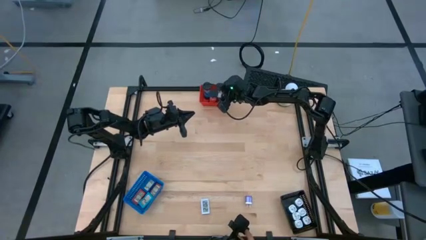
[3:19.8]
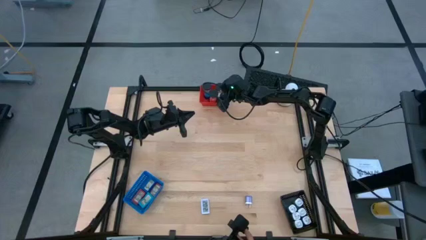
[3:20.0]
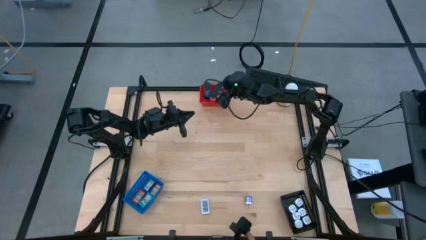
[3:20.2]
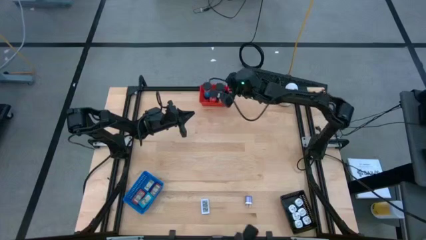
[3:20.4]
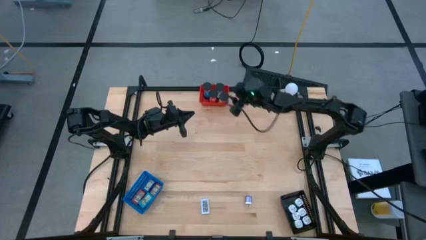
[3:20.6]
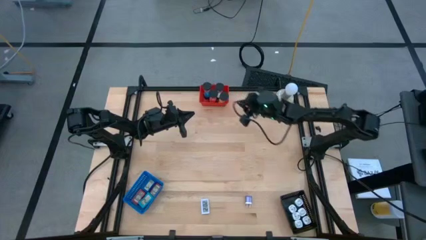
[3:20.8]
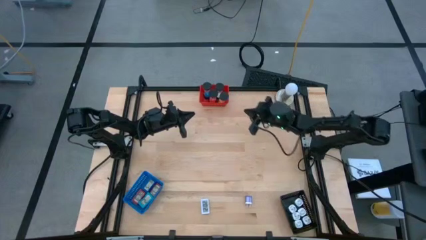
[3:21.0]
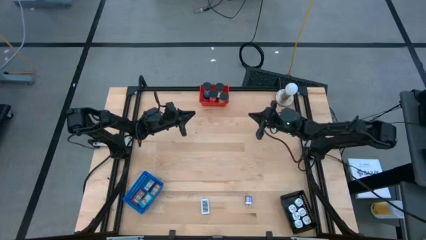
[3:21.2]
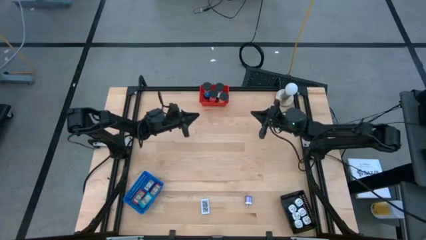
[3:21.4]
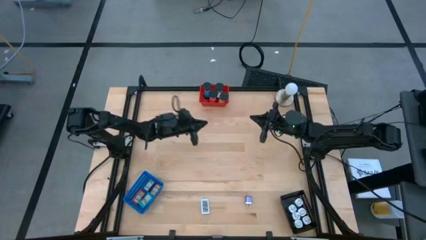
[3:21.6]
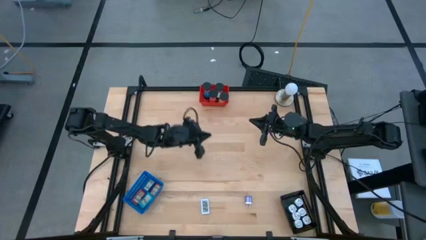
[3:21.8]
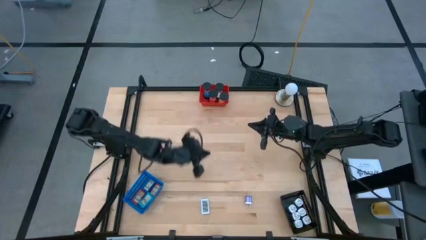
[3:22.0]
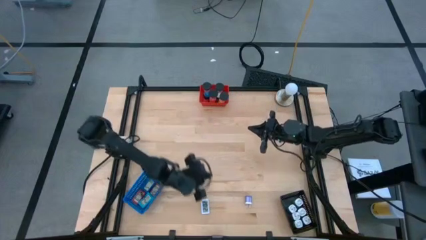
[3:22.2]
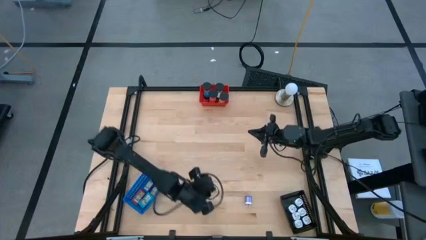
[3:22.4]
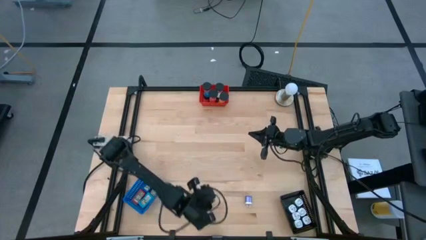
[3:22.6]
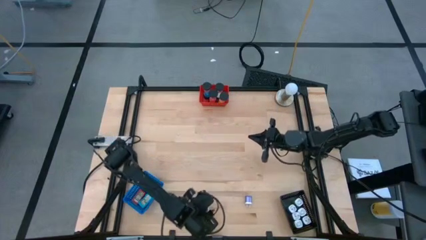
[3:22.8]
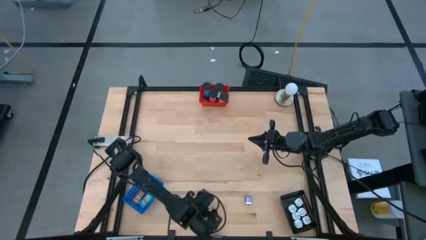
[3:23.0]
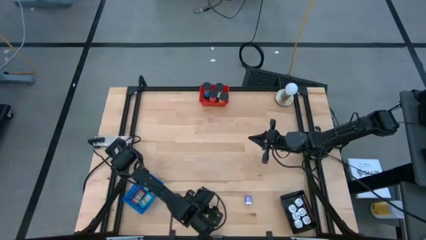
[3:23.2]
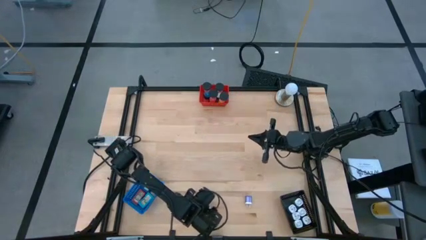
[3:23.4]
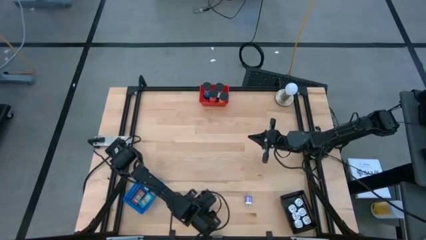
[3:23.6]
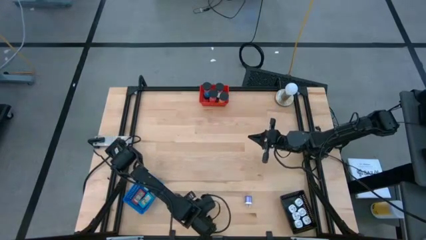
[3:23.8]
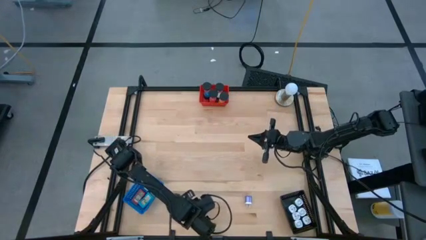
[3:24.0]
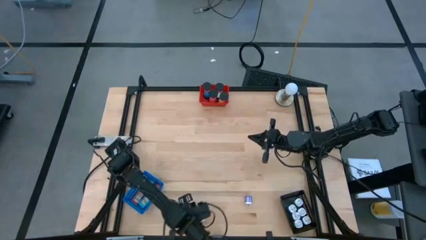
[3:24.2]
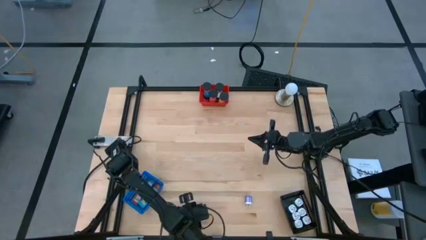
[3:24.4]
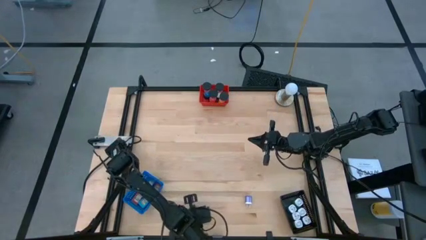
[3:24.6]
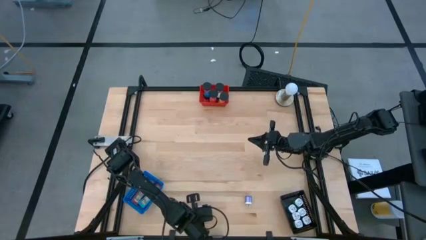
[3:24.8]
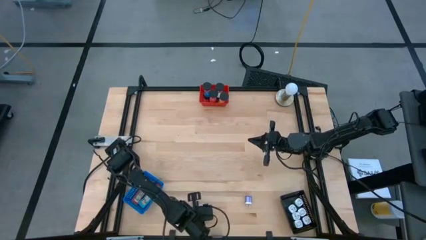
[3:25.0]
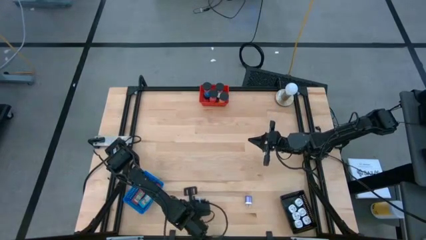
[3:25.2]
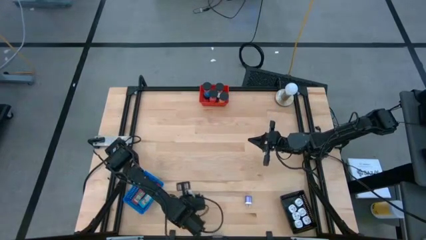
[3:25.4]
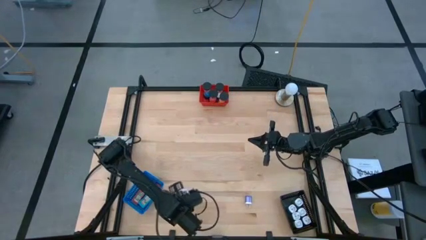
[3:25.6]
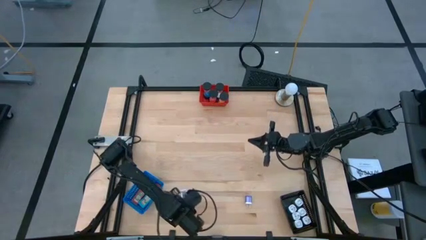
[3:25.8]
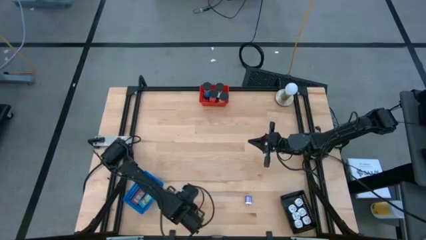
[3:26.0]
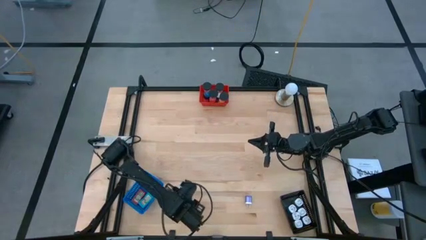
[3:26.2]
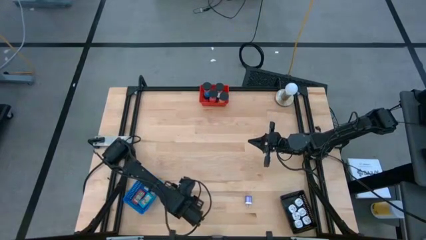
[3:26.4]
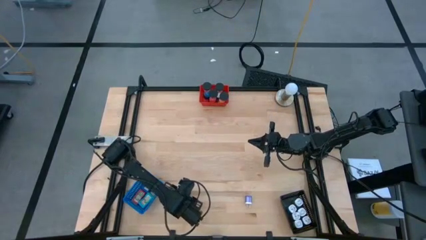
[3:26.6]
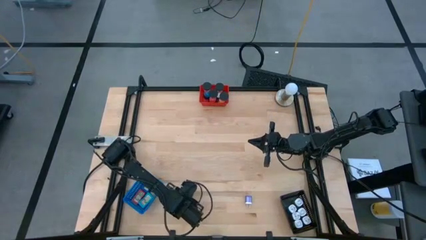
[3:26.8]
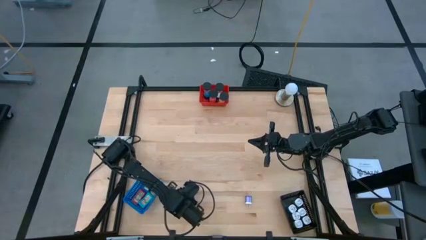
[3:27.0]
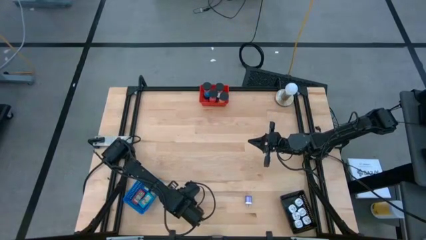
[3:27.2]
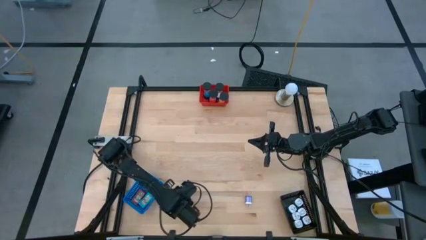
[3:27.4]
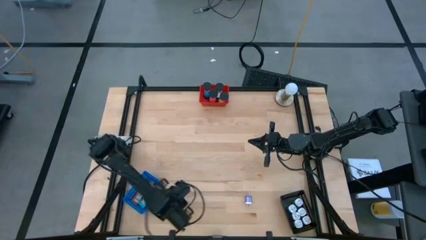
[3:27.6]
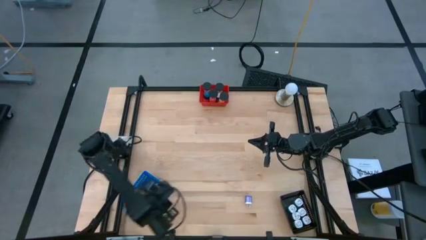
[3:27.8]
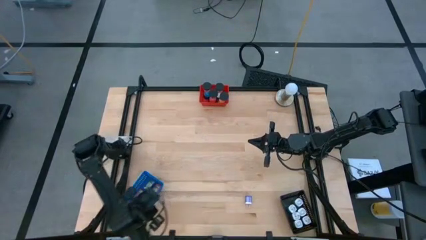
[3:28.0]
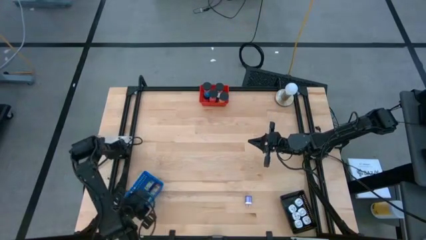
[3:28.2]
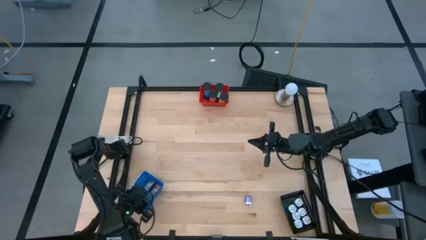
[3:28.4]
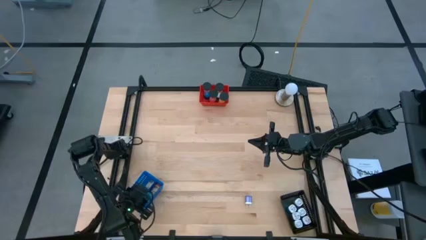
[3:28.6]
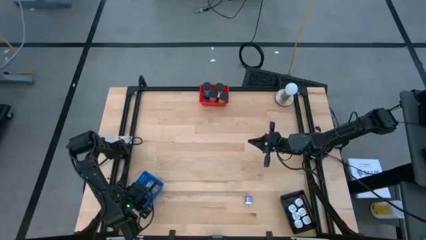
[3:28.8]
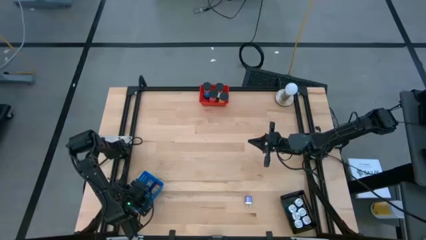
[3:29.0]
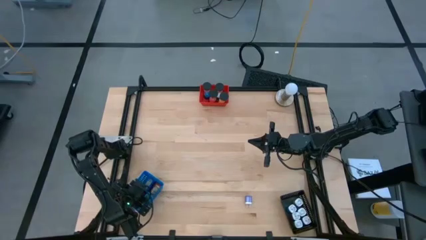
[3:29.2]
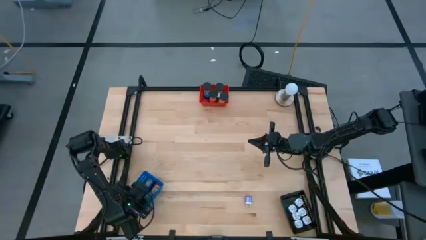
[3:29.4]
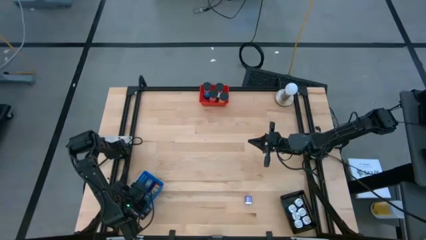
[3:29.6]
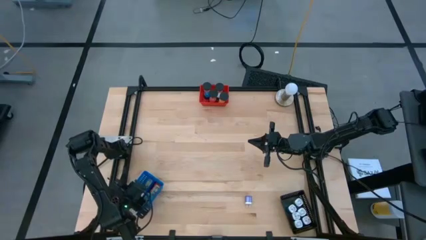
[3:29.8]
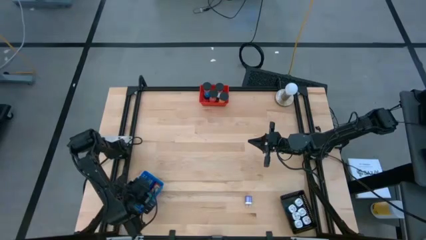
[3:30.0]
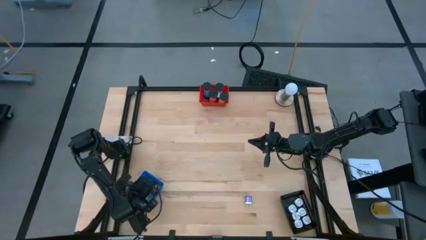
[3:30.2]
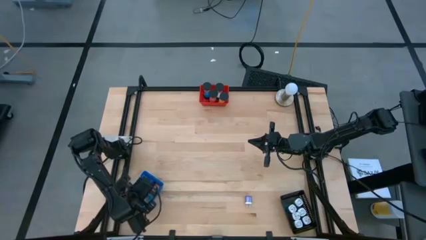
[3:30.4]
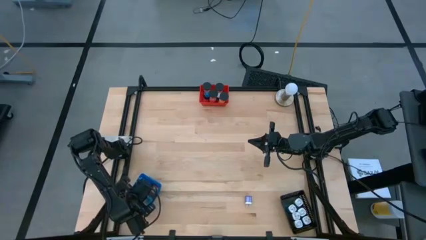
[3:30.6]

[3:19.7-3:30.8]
Task: Pick & Place Office items
Put the white digital timer into the blue bin
